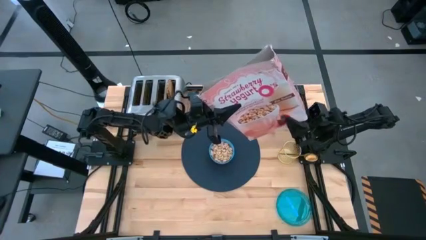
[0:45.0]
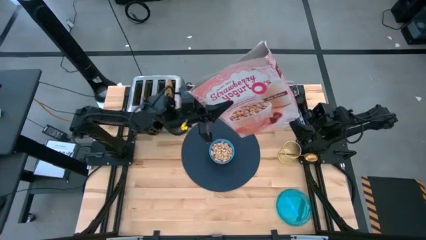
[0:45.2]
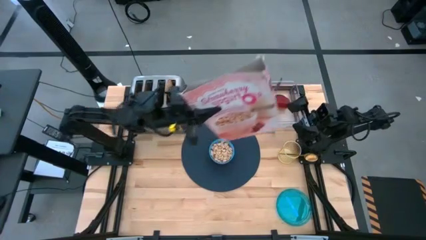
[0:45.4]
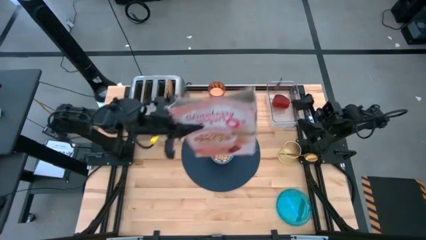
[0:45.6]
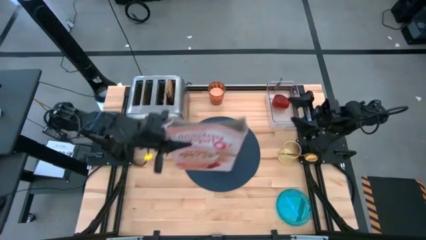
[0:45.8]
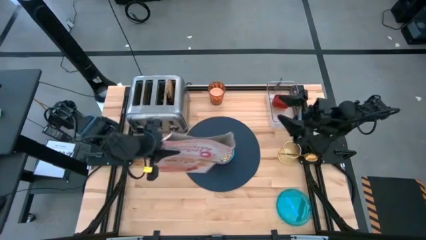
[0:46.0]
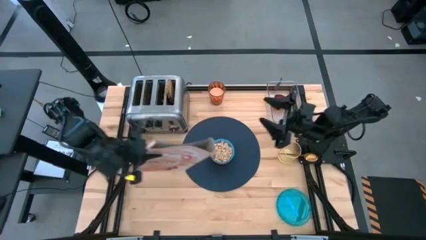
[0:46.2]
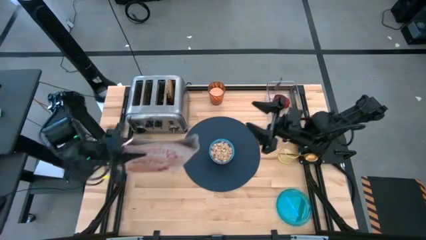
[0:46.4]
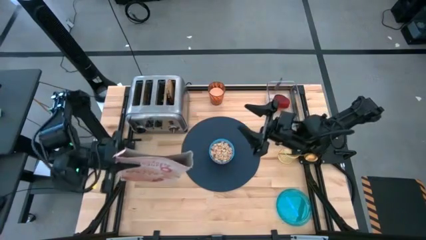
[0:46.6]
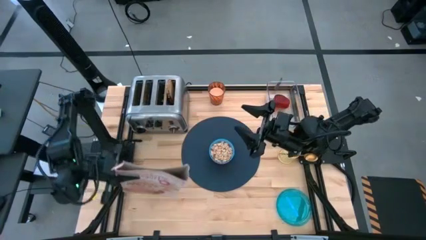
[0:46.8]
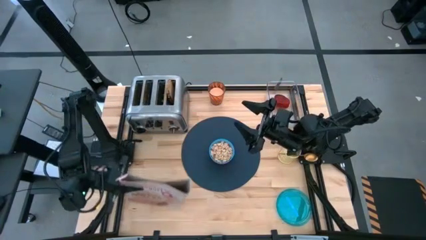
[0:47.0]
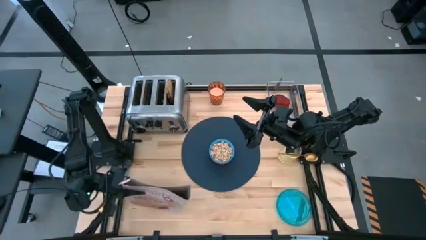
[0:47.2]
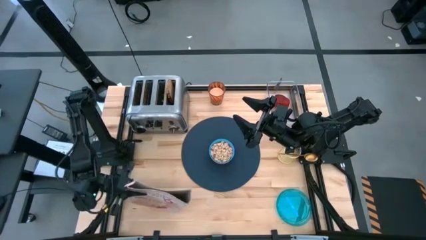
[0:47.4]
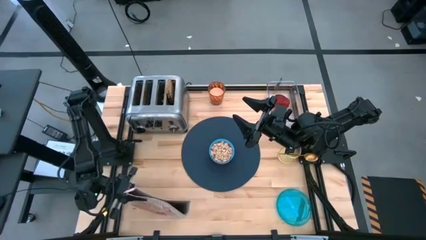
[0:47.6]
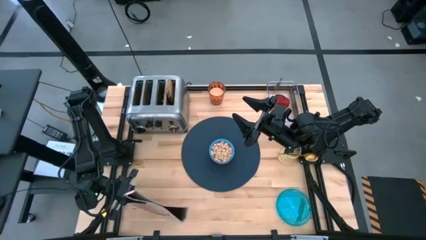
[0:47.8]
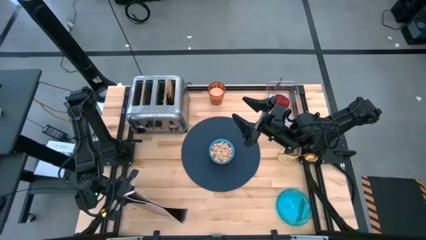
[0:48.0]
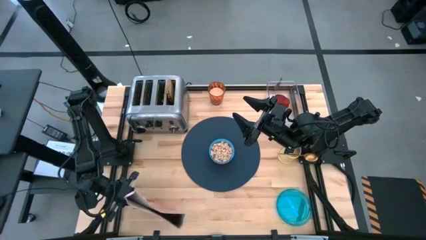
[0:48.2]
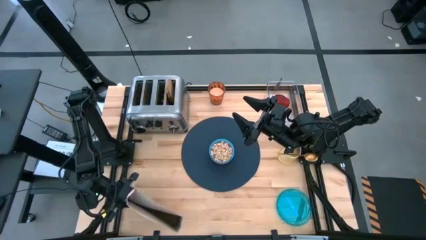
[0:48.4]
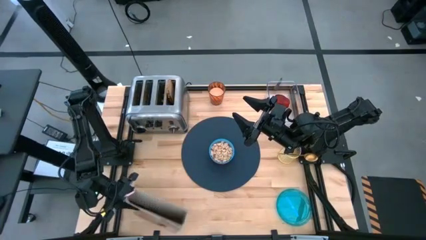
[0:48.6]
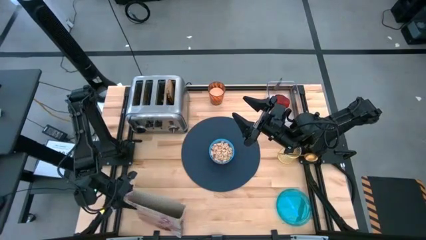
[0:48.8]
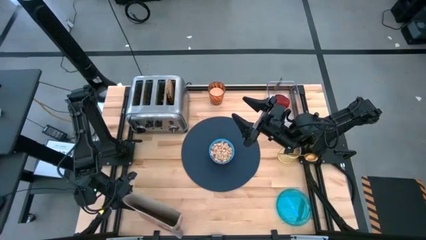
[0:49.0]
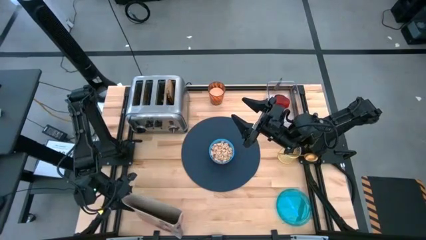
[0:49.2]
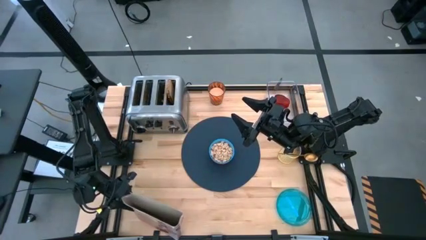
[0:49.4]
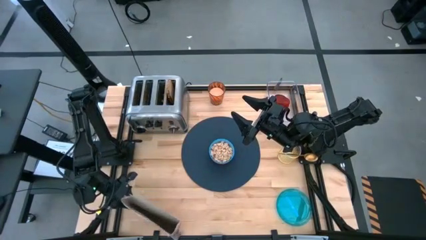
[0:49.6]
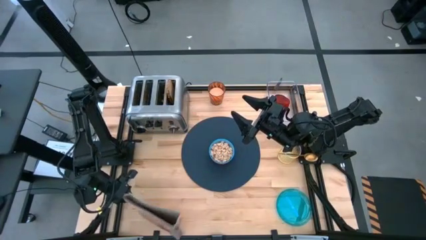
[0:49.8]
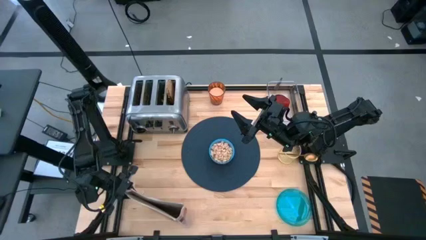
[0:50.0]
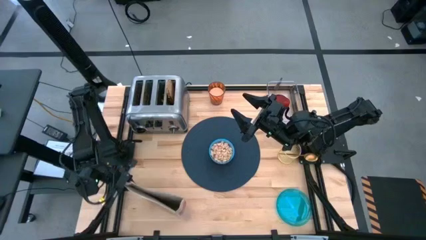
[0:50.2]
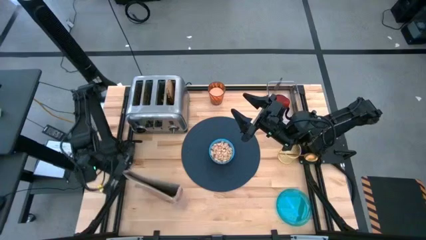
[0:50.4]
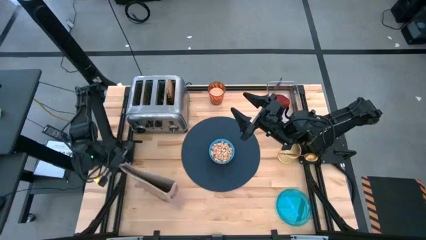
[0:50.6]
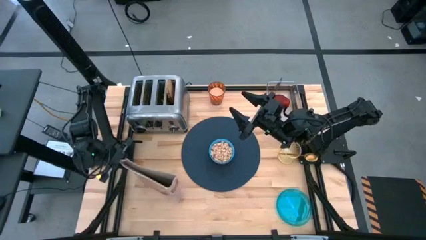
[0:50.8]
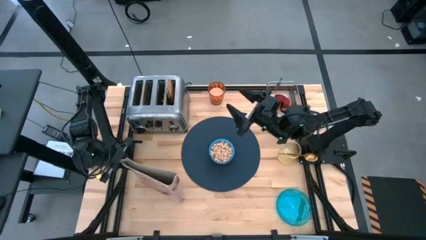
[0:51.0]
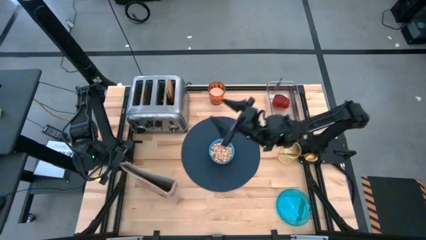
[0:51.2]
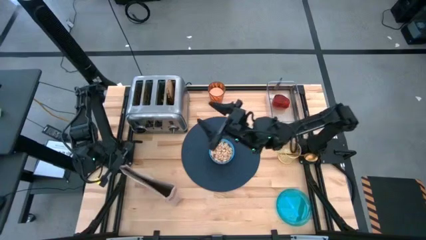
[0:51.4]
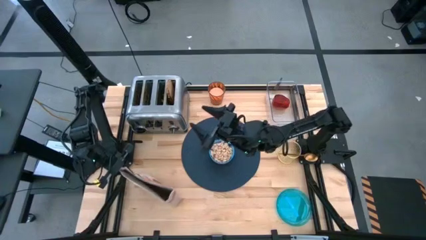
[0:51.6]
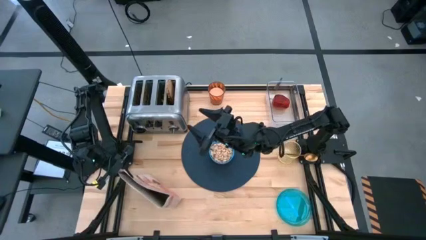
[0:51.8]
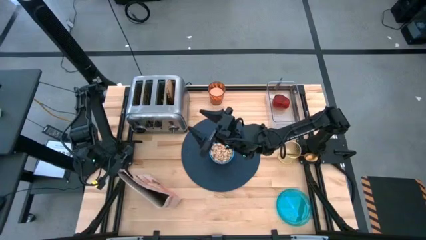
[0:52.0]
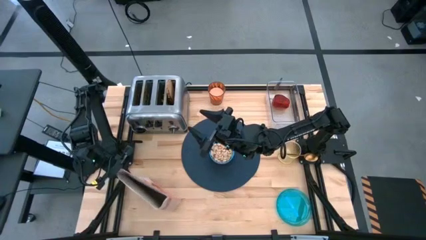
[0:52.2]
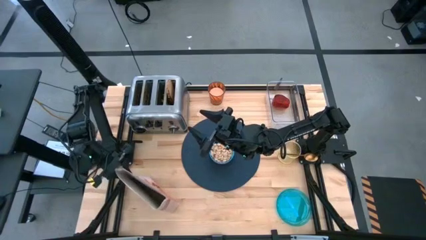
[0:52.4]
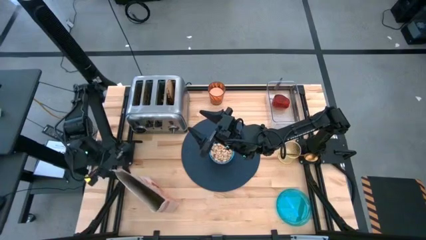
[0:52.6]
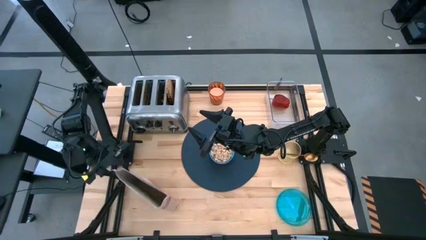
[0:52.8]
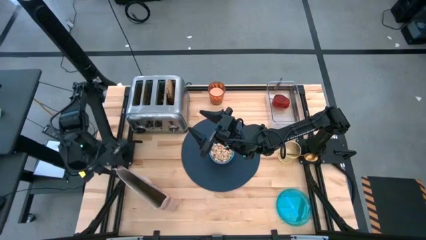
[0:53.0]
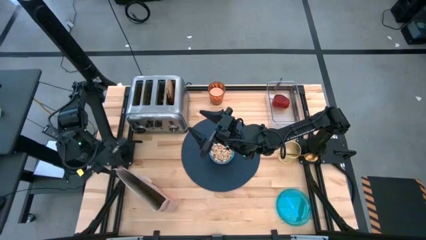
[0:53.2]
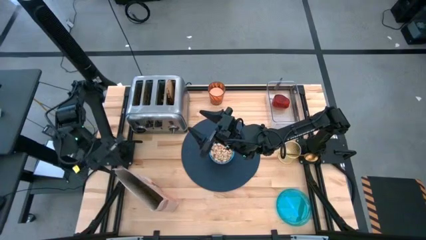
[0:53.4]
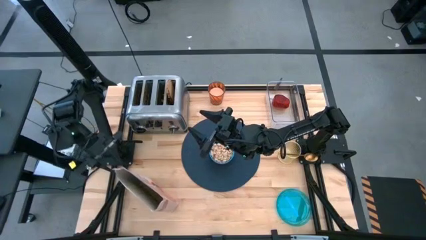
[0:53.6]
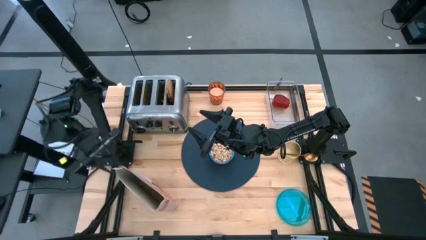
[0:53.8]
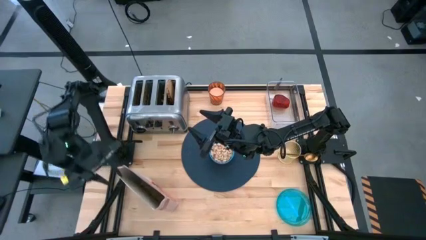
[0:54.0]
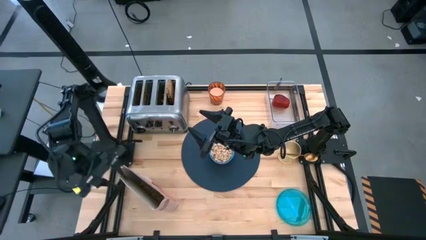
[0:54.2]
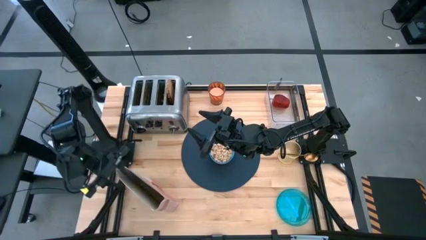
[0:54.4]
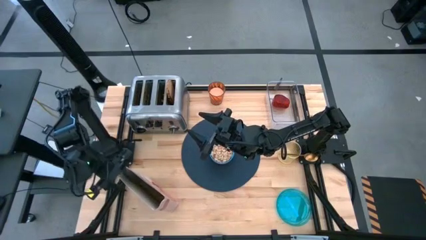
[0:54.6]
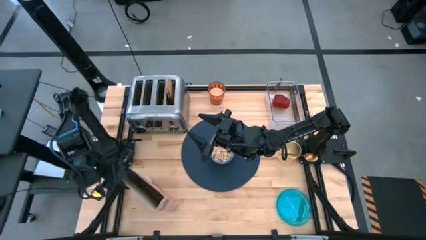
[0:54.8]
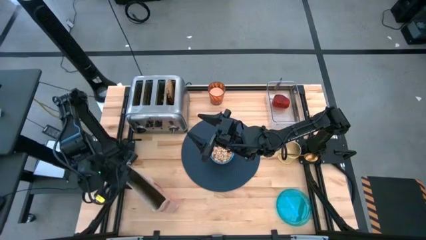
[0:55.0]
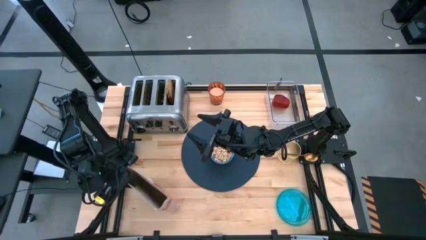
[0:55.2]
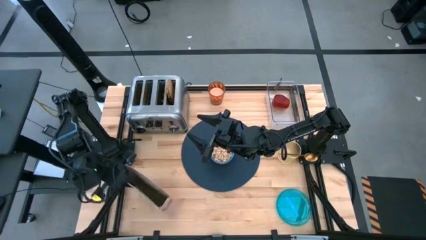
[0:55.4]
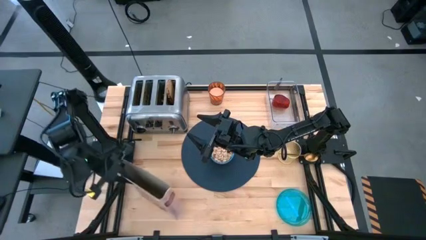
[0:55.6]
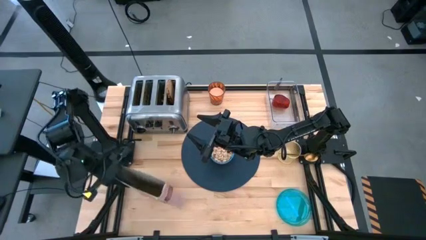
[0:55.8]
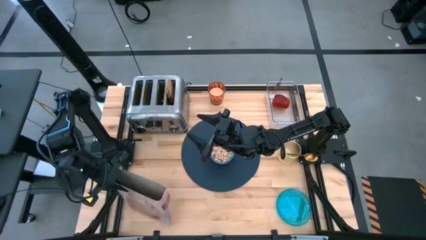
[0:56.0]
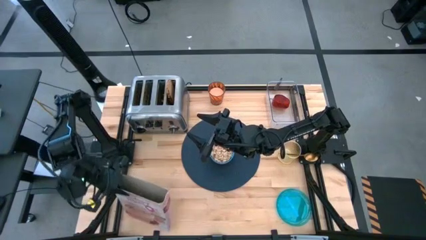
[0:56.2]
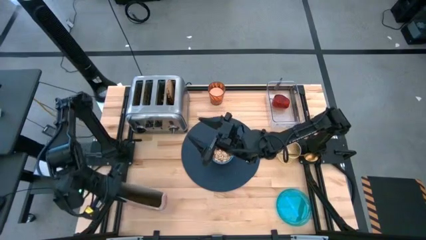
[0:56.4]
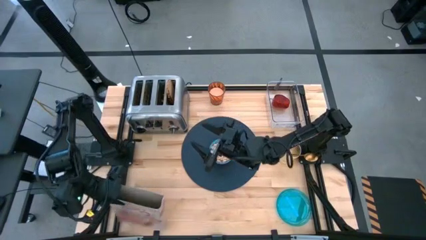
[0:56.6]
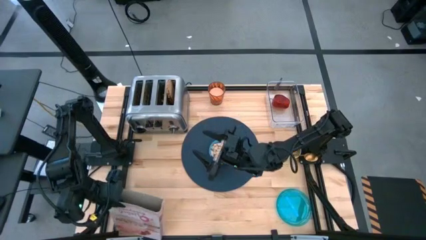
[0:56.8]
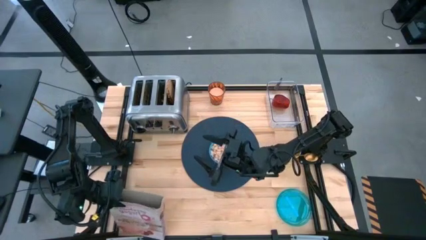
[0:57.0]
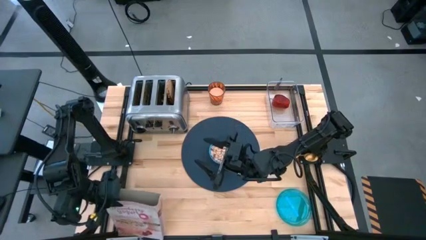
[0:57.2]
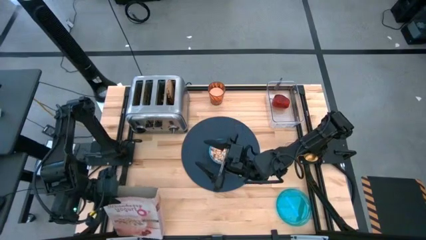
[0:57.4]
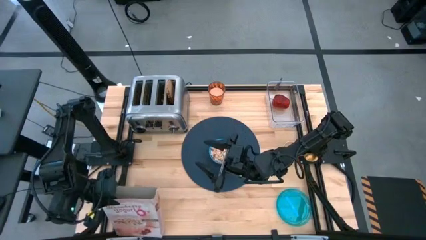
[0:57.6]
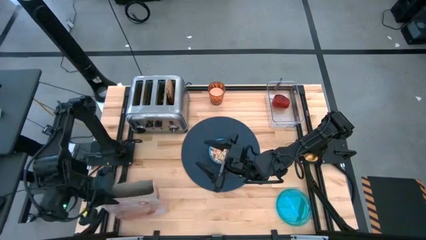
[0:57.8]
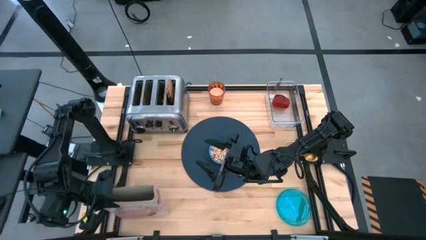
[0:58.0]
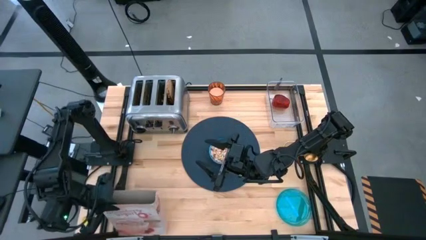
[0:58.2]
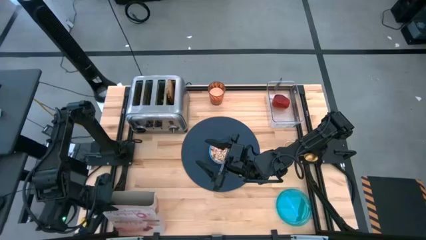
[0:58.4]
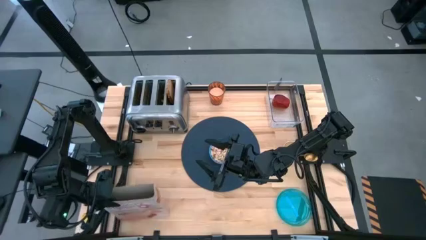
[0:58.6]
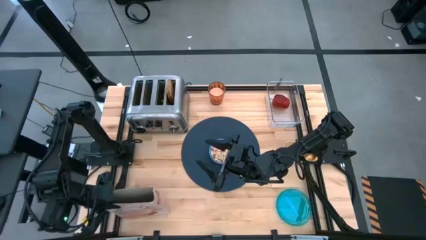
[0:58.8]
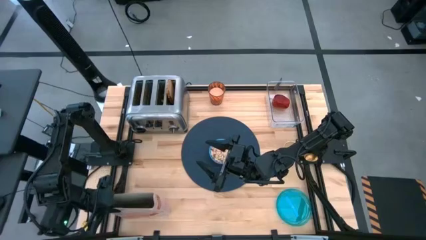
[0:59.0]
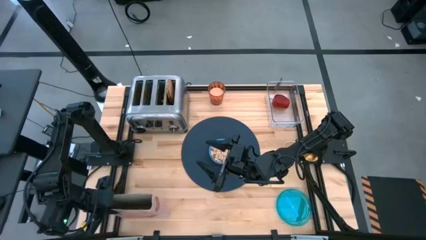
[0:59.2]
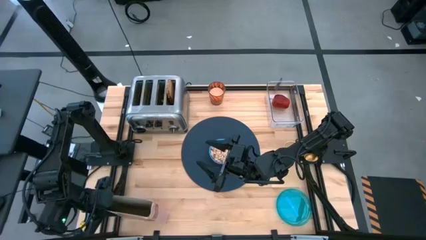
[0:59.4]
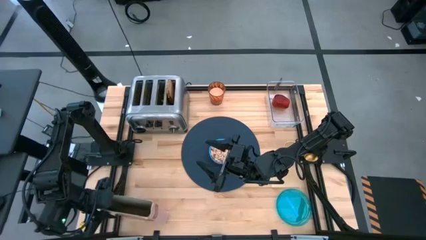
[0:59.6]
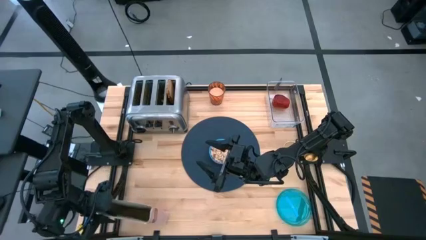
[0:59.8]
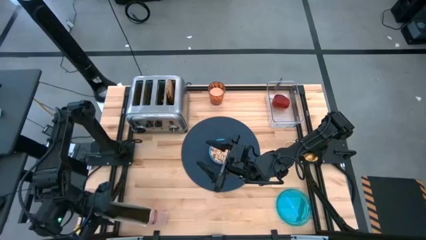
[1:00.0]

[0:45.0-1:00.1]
Task: Arrange a breakfast setting
Pour the cereal from the cereal box into the blue bowl
